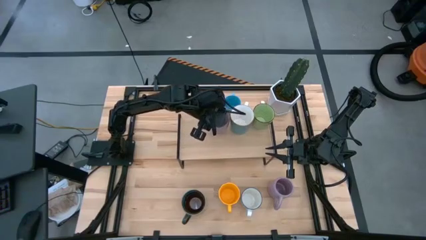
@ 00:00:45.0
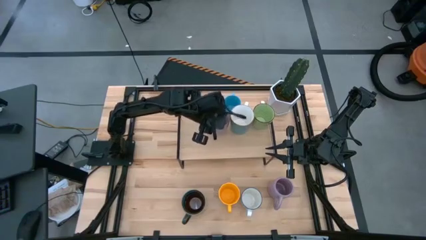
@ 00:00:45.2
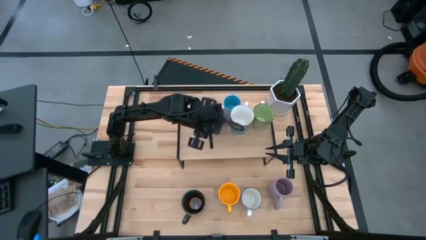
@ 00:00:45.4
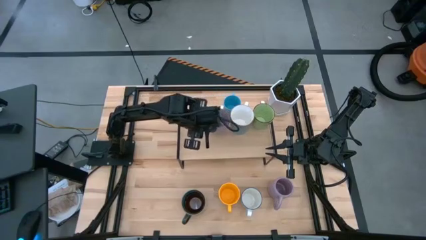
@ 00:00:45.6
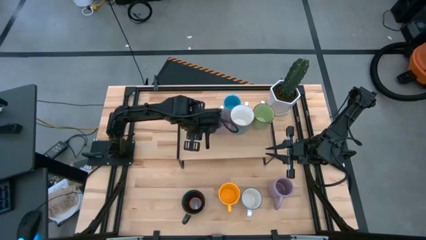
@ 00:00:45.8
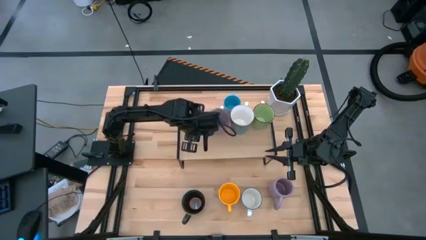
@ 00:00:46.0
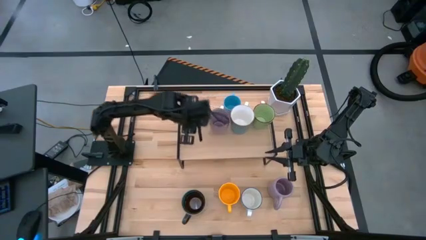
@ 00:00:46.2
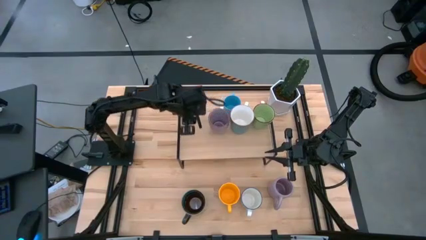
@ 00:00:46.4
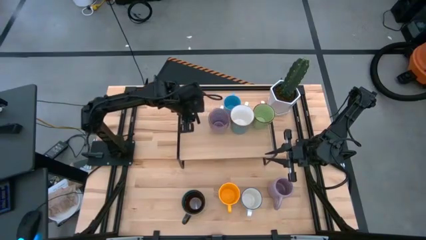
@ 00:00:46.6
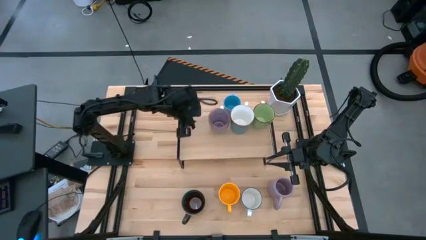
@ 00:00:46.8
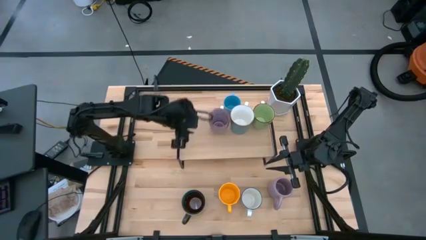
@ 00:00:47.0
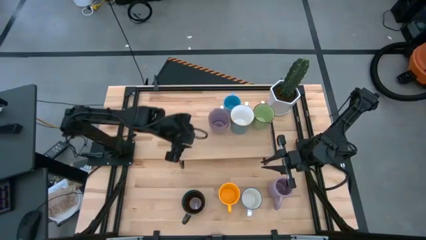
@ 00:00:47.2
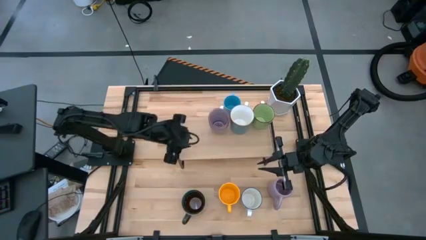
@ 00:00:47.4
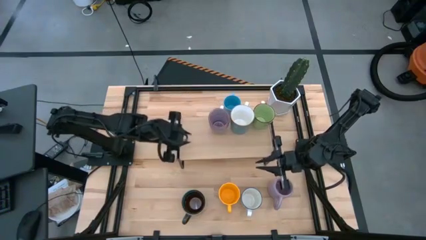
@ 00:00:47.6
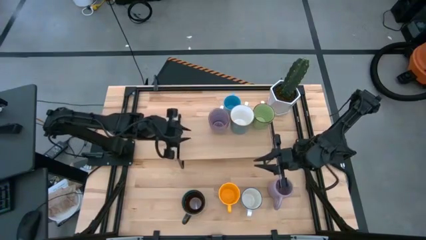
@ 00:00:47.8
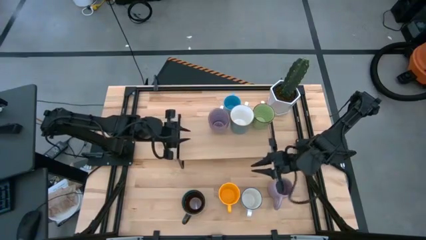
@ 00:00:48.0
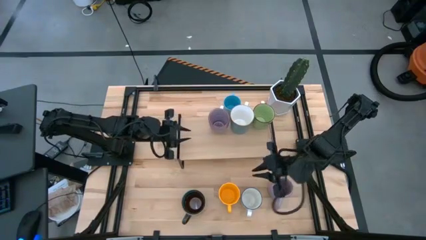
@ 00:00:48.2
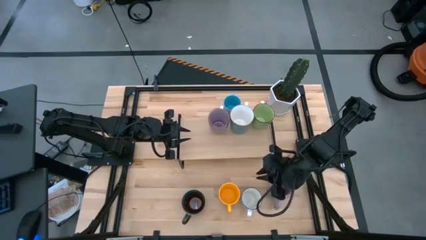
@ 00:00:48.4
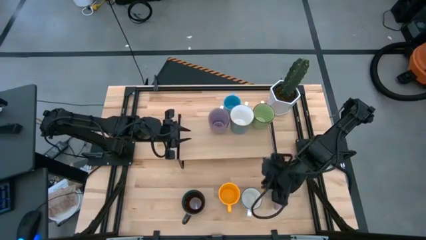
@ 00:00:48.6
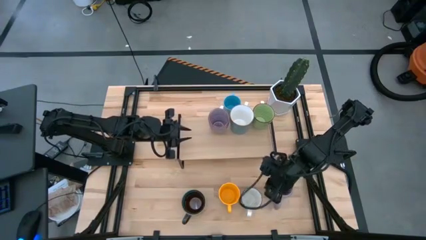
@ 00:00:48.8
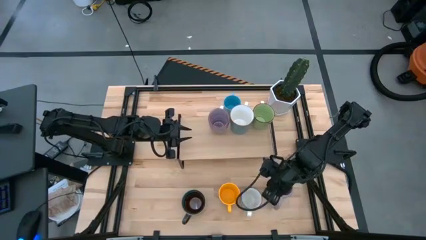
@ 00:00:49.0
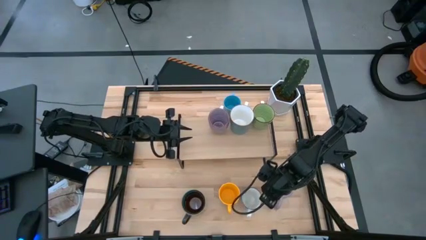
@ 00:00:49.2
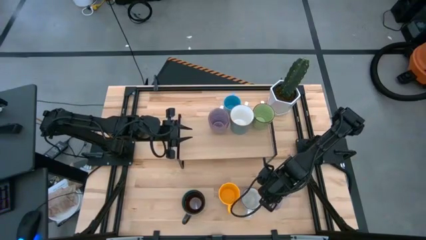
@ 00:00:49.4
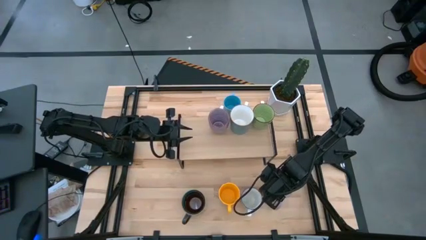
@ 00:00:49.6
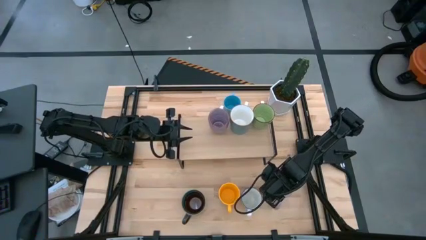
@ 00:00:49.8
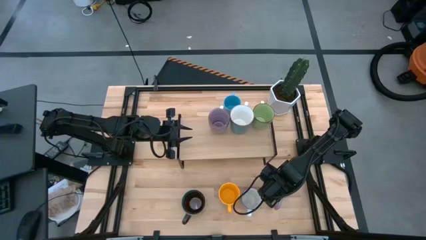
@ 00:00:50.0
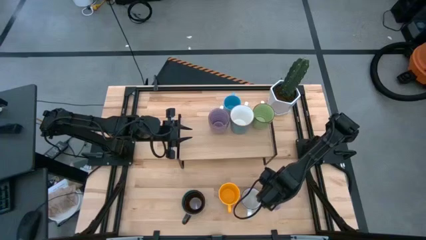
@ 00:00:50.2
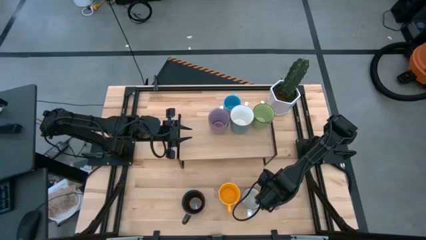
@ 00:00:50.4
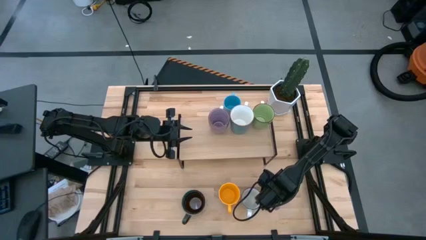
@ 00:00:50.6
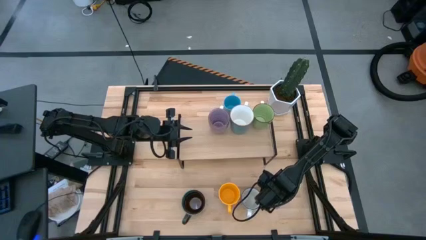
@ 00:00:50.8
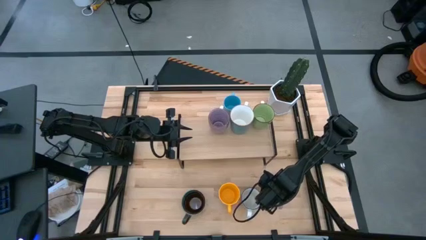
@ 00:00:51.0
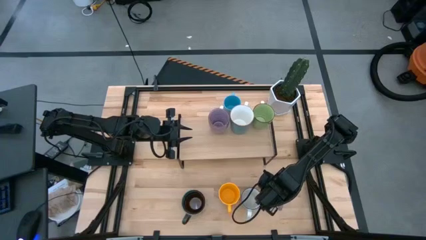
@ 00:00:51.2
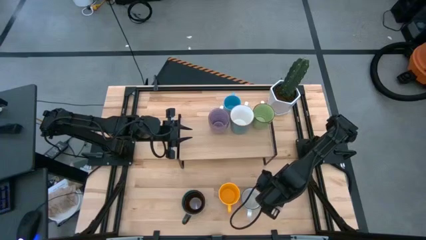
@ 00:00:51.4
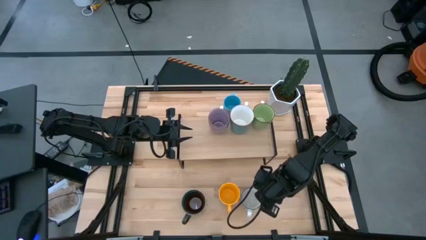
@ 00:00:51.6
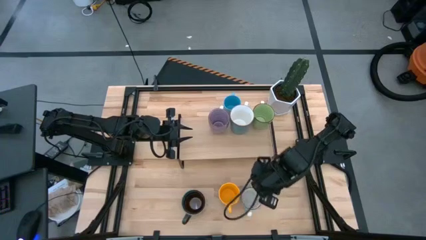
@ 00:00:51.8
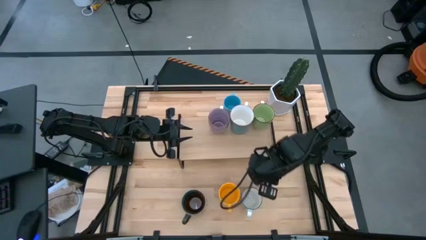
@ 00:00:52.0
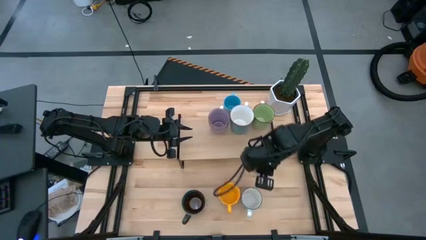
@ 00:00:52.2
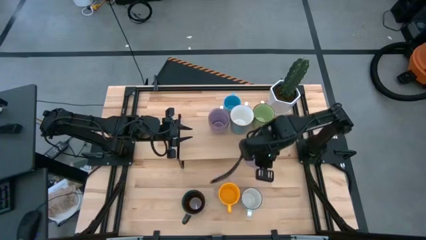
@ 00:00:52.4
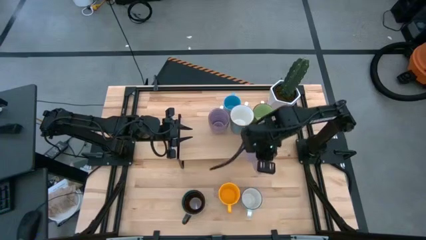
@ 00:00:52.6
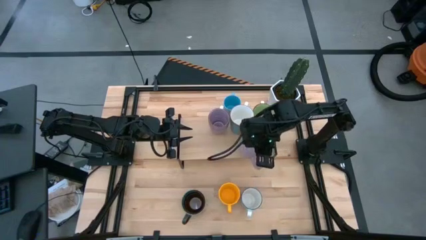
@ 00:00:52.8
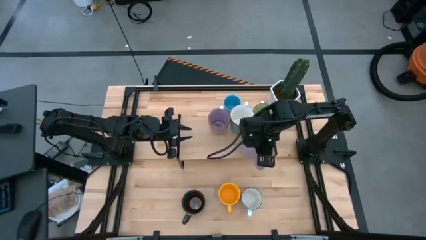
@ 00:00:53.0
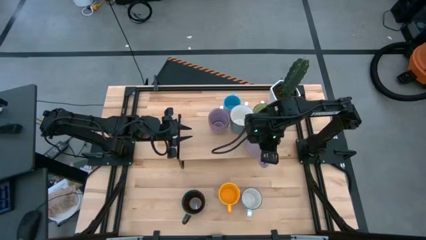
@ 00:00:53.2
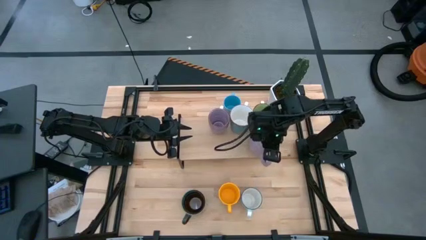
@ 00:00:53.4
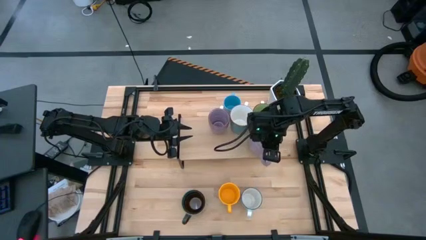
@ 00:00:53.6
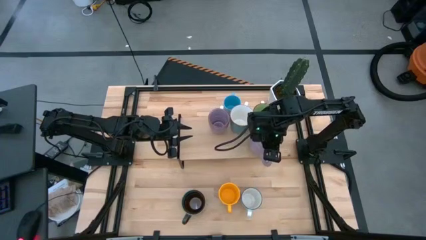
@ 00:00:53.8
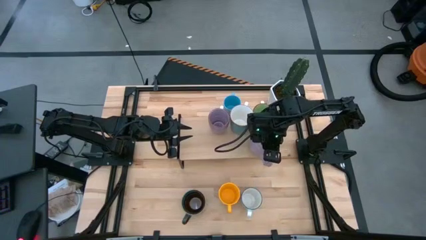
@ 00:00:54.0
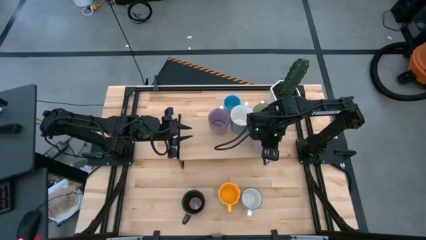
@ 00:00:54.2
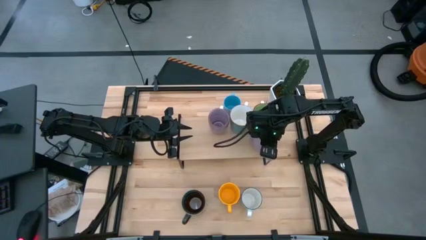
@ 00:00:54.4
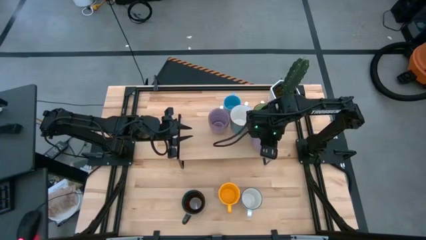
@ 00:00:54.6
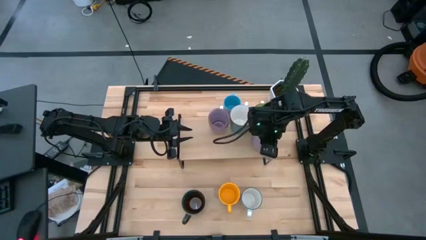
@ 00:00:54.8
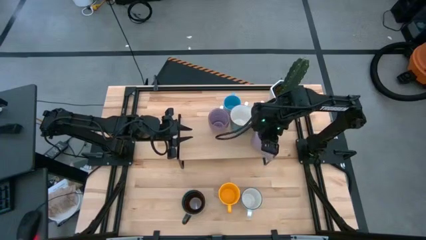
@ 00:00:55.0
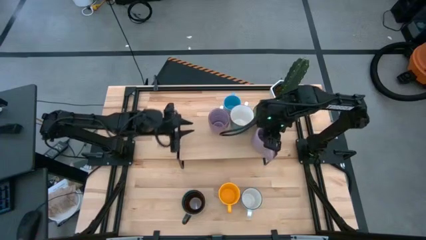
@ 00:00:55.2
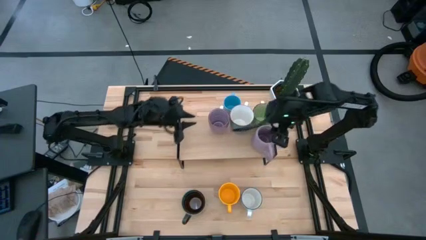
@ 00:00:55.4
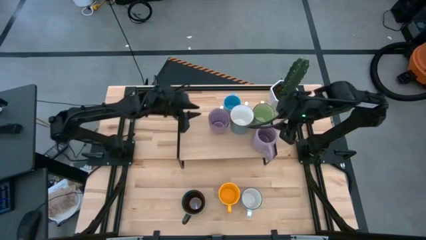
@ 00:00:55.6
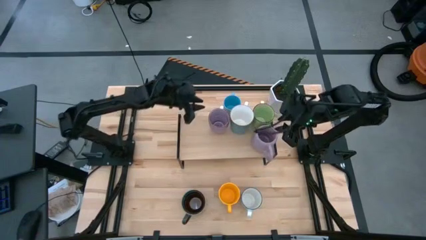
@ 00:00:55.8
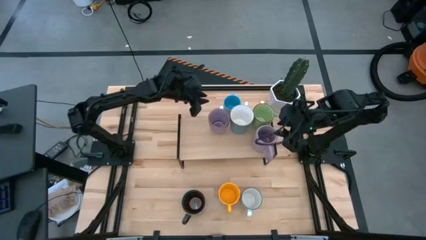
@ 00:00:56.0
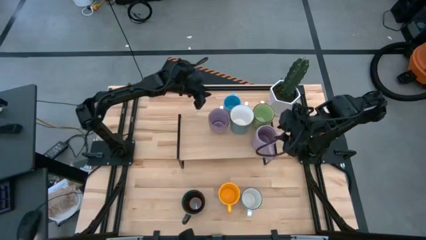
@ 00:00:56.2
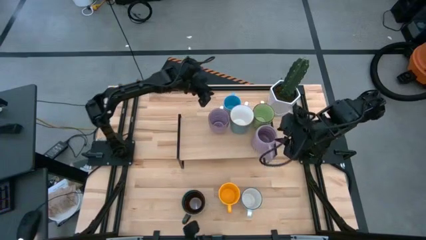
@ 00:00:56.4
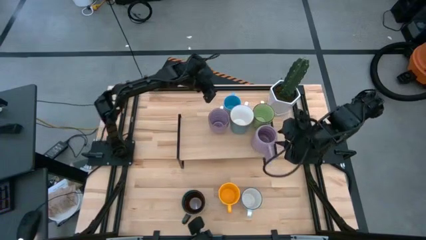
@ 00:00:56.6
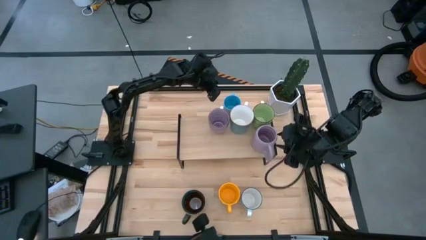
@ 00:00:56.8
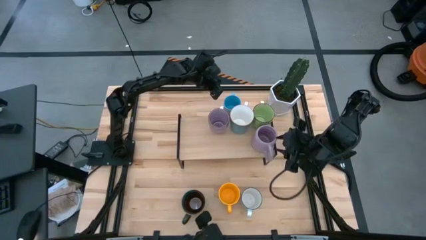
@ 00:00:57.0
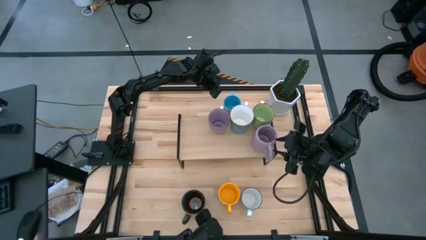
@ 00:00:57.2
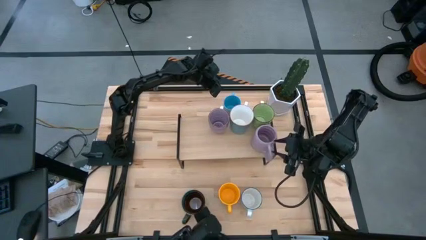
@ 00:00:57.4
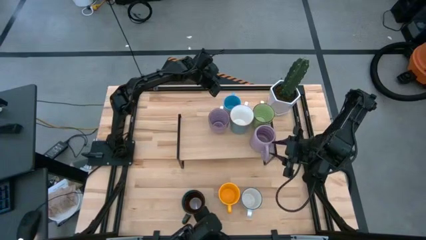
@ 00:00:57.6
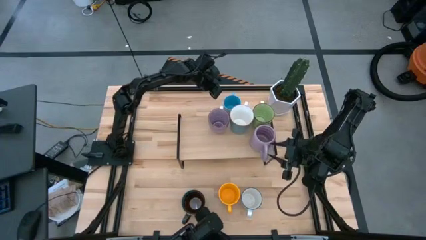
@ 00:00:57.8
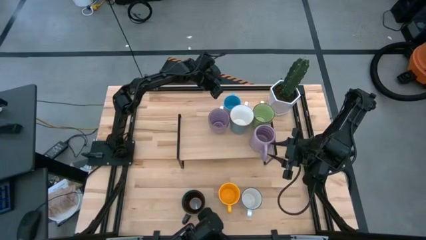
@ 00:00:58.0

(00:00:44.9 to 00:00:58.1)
Task: Place coffee mugs
Put the purple mug on the shelf

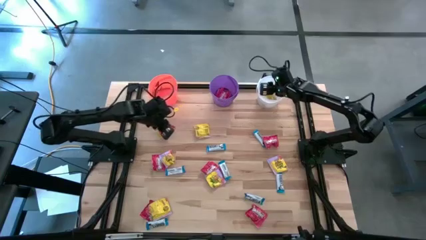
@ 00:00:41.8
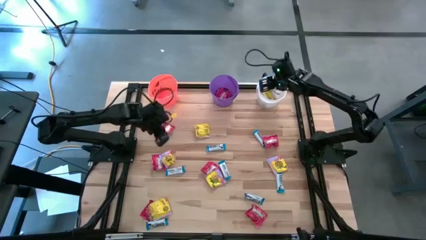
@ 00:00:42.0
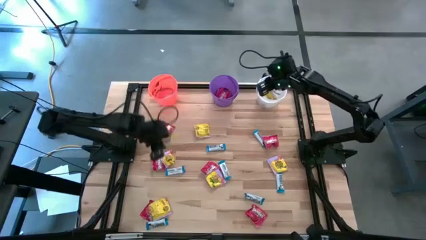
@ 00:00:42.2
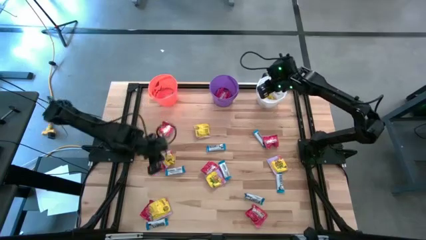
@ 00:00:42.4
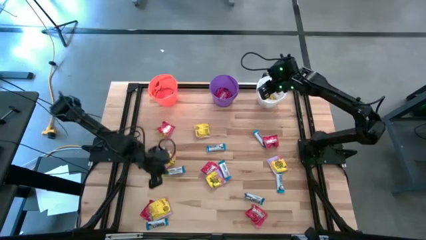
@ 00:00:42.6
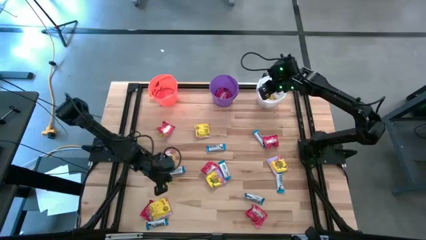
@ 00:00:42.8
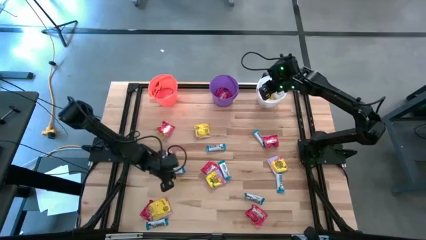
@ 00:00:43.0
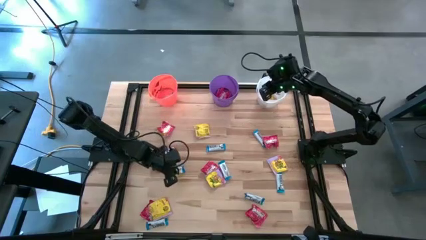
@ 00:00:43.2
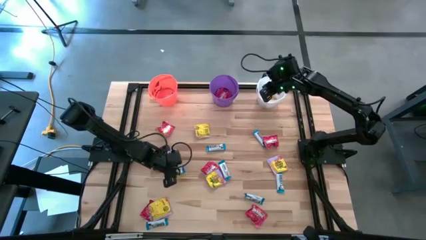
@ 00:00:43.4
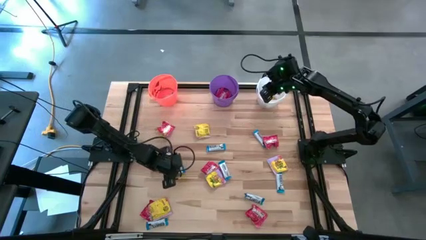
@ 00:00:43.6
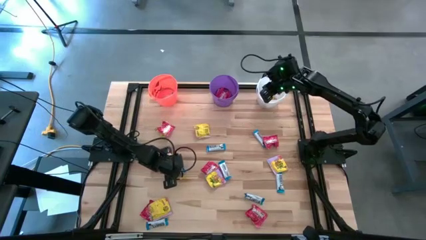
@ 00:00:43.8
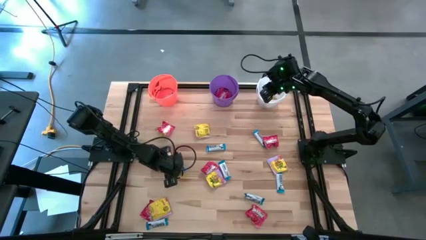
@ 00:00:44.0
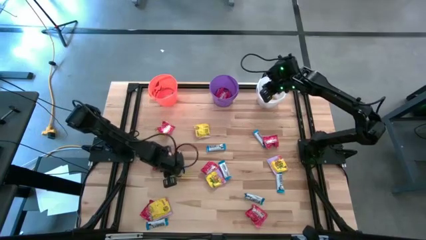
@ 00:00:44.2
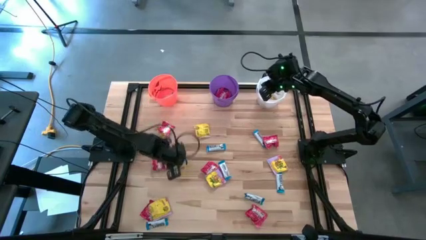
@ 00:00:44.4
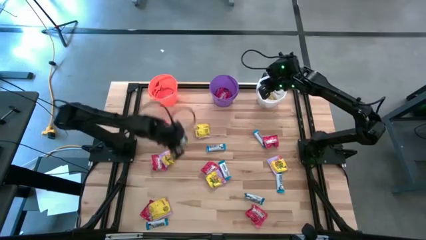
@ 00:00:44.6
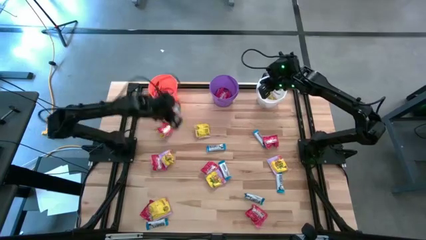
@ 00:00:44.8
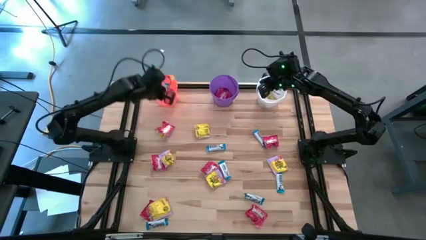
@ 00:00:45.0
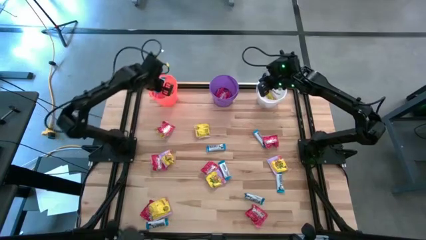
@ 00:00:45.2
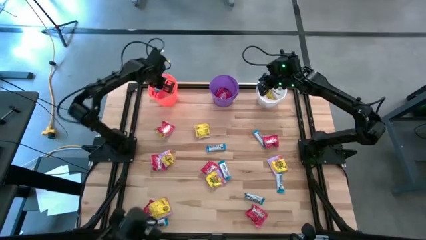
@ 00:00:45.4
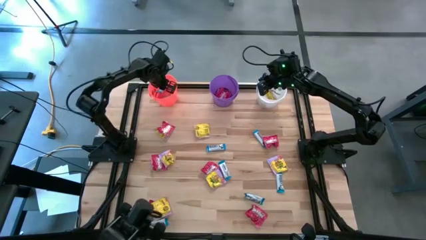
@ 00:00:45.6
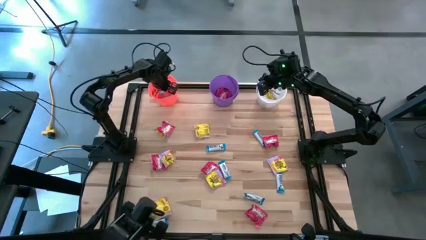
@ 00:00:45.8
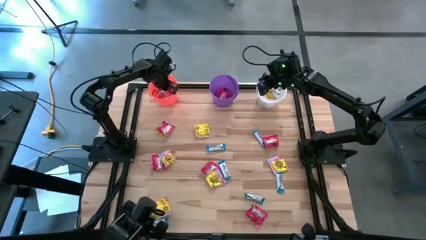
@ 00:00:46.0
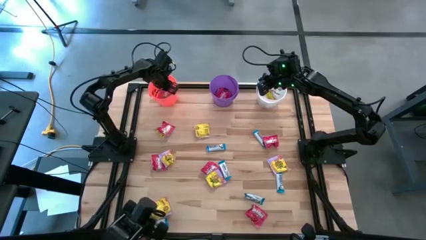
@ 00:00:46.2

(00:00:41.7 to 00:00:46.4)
Task: Sort candy
Put the white chocolate bar into the orange bucket
